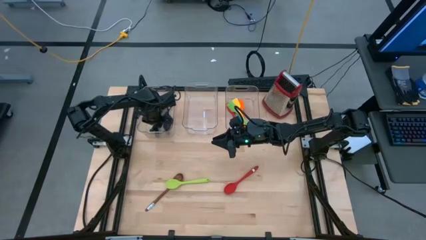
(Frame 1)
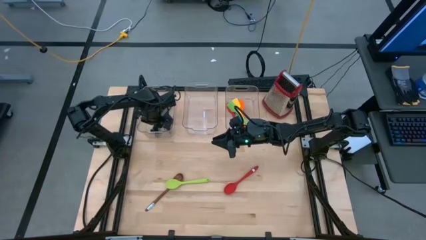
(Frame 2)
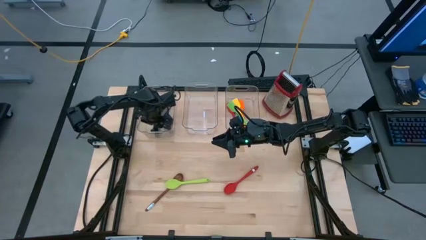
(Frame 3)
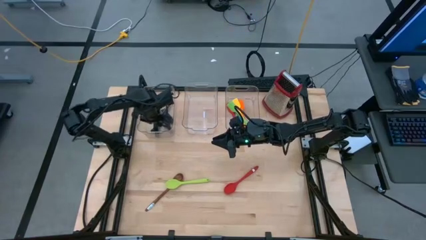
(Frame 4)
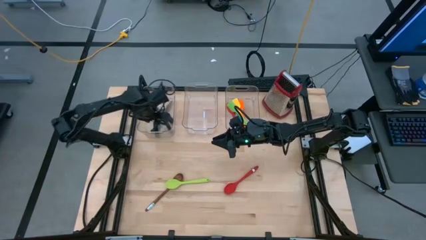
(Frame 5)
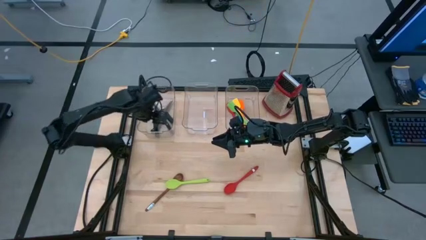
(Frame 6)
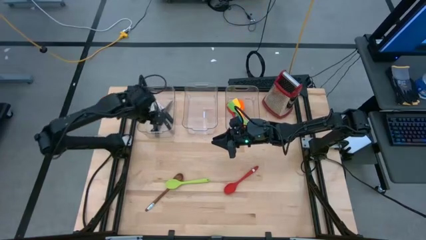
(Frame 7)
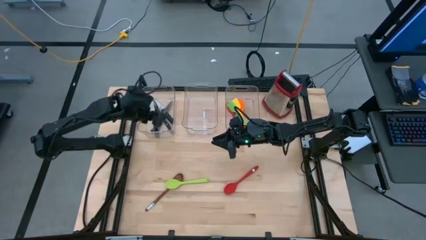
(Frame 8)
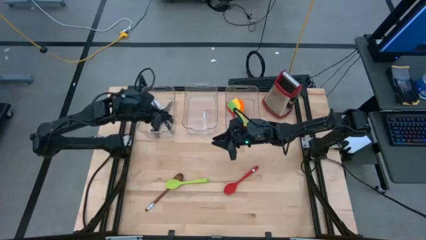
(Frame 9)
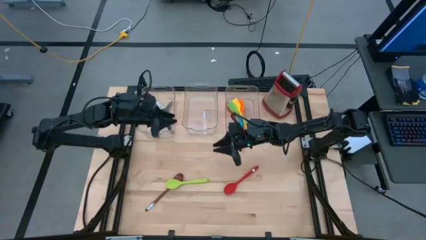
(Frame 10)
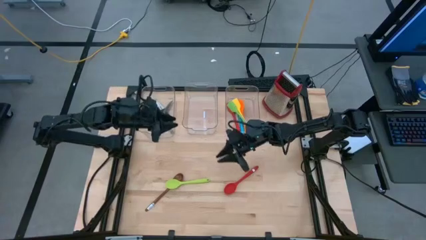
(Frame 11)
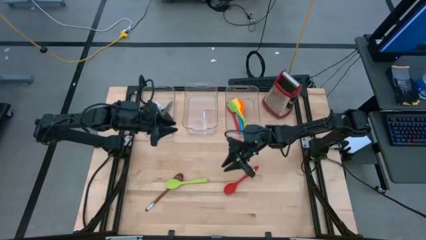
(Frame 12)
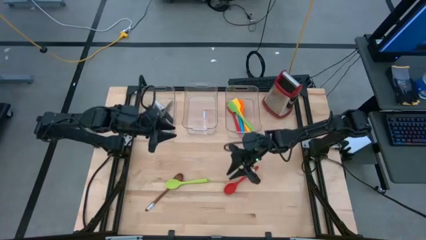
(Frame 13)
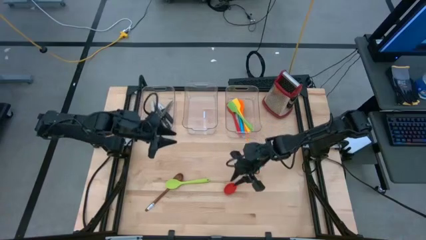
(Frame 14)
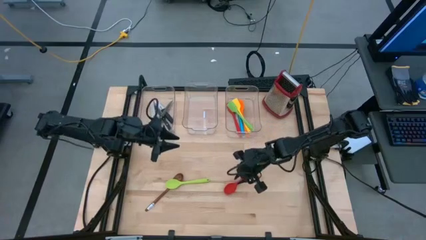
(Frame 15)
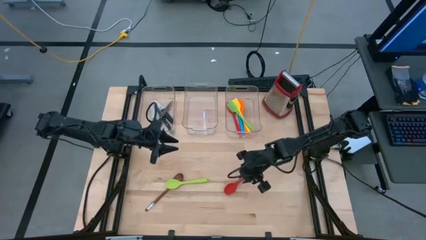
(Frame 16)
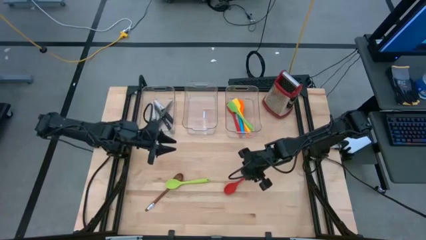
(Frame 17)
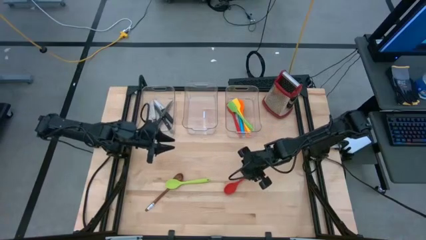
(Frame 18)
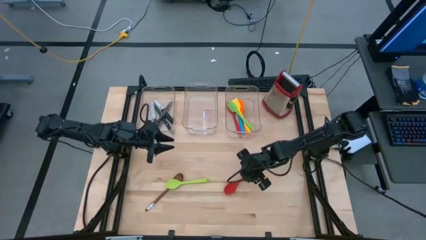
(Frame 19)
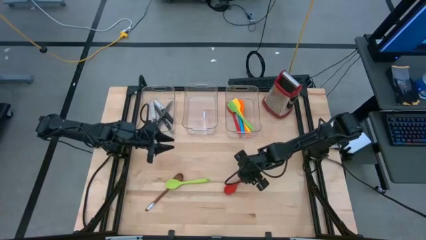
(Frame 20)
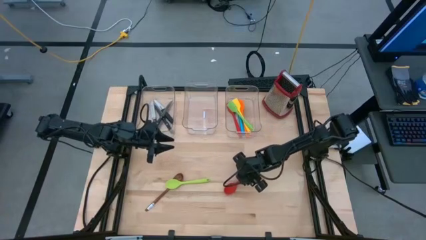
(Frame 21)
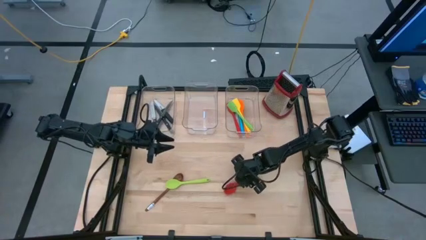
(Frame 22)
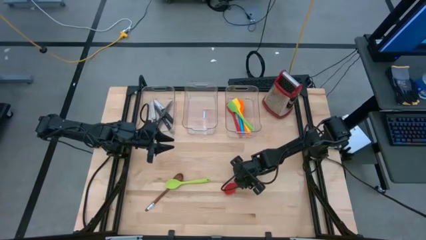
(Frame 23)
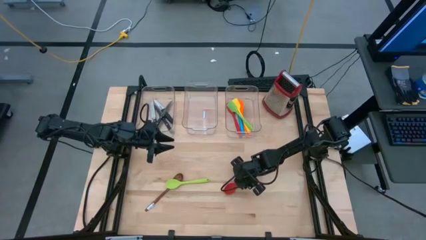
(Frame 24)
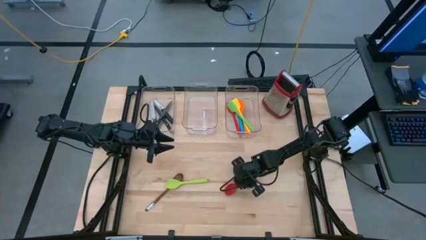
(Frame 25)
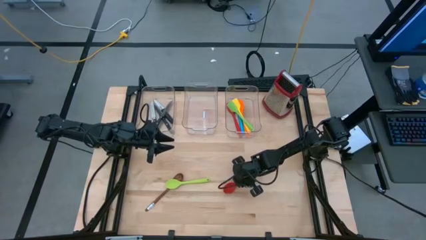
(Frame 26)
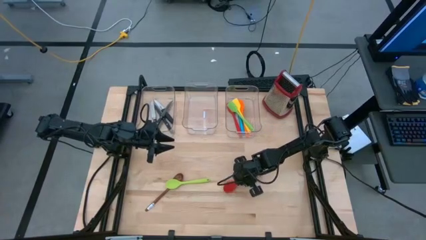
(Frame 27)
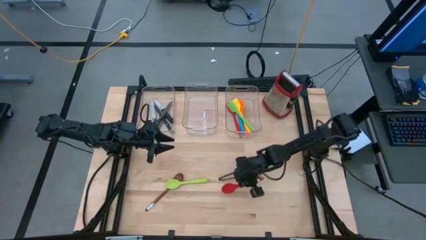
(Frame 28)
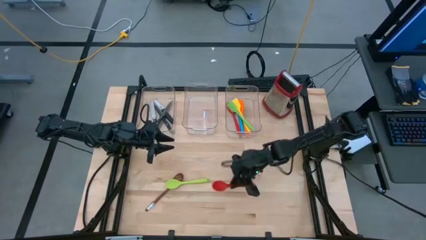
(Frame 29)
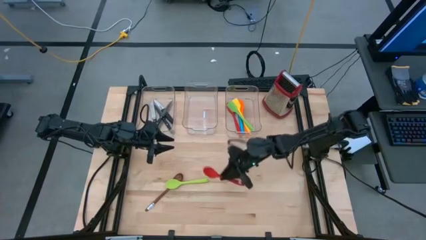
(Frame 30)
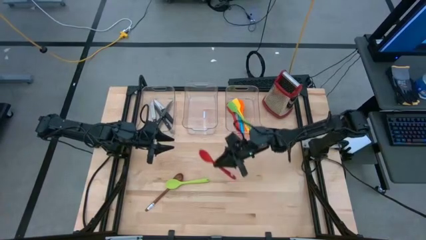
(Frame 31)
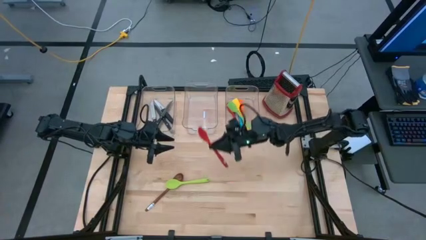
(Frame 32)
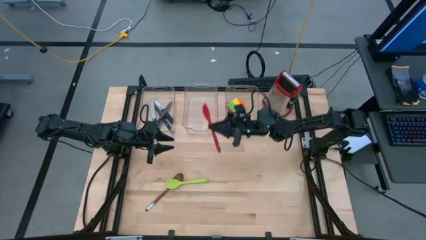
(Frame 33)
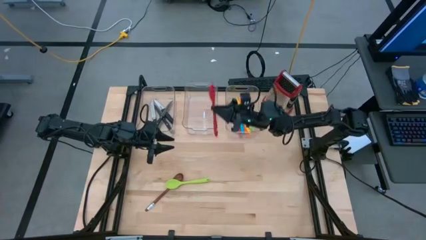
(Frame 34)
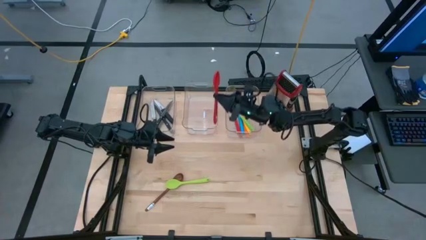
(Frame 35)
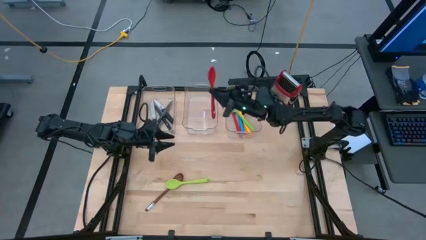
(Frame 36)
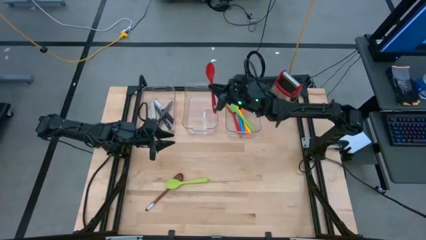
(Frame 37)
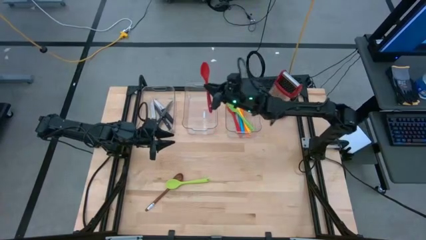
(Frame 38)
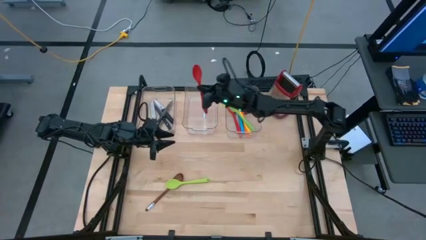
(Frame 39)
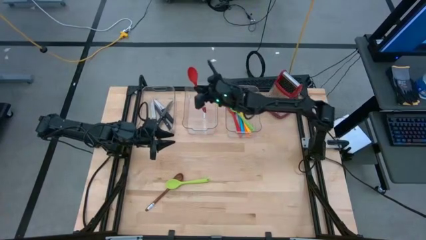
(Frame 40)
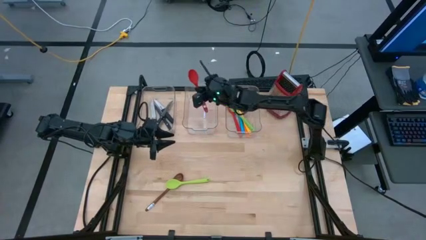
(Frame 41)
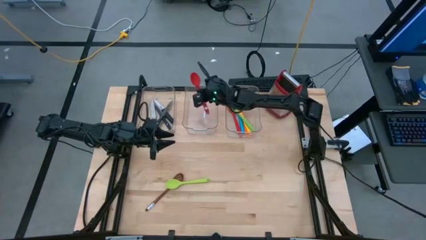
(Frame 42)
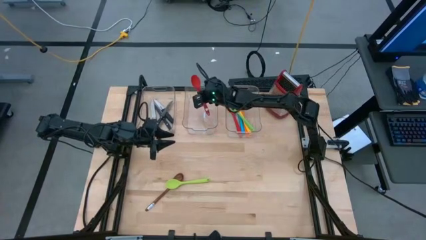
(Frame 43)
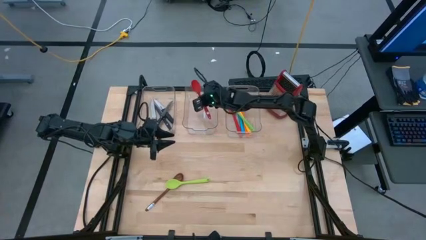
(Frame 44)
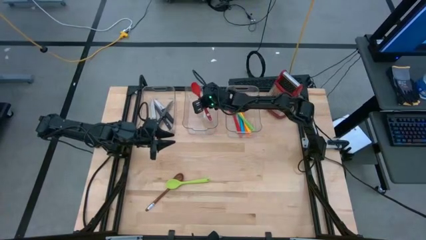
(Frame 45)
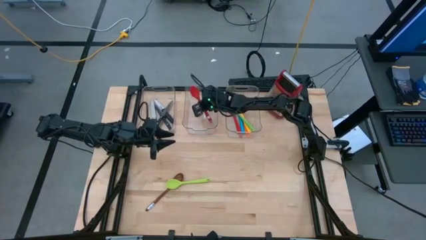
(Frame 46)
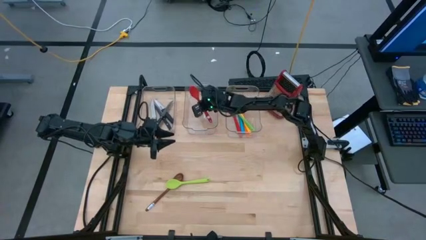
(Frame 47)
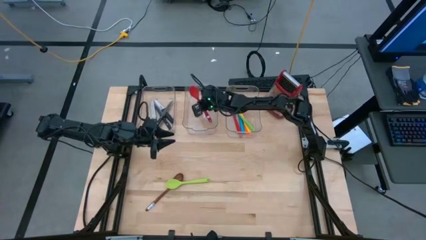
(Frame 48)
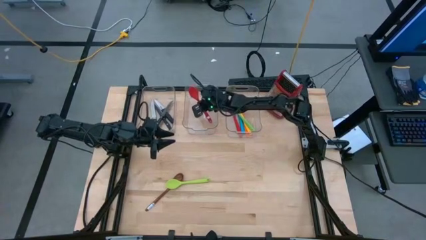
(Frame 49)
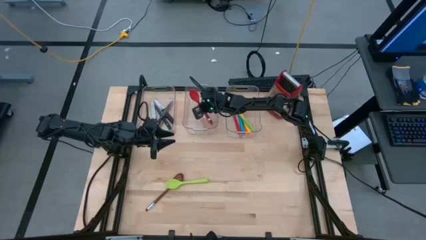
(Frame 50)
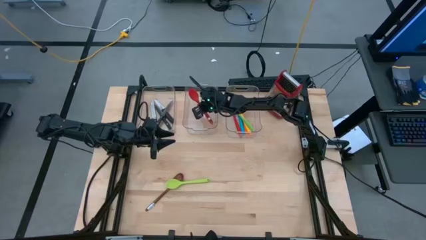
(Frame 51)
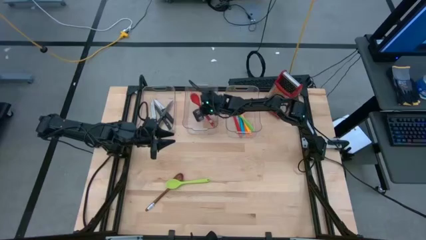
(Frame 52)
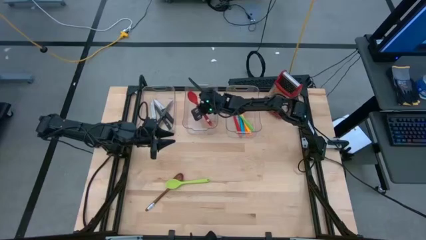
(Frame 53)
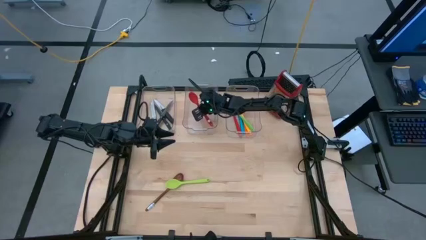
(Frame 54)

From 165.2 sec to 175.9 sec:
Task: Pick & Place Kitchen Items
Put the red serving spoon into the middle transparent bin
